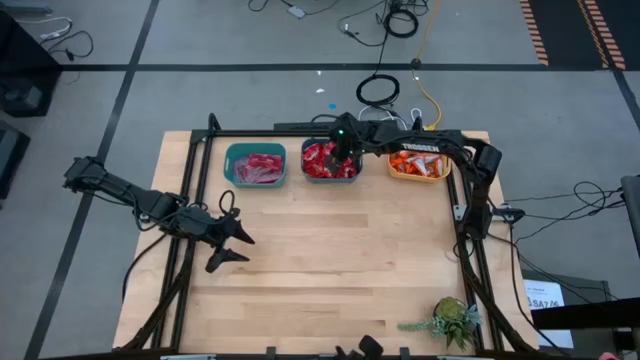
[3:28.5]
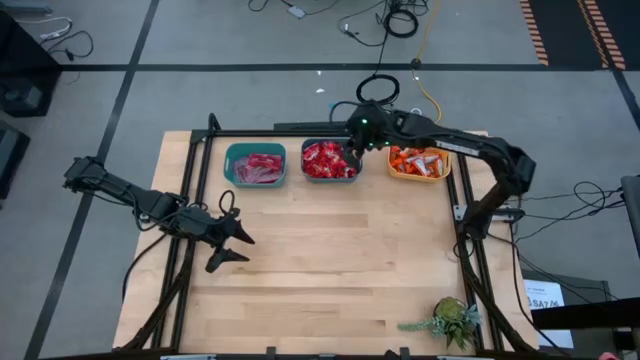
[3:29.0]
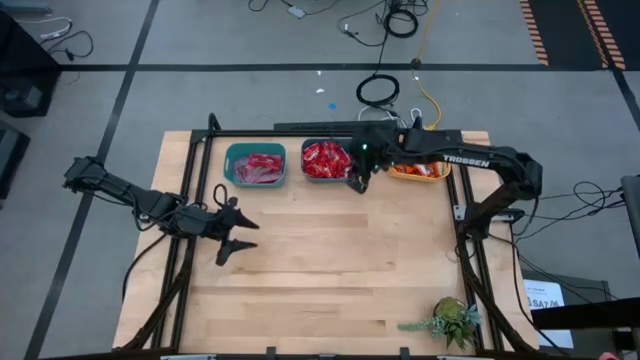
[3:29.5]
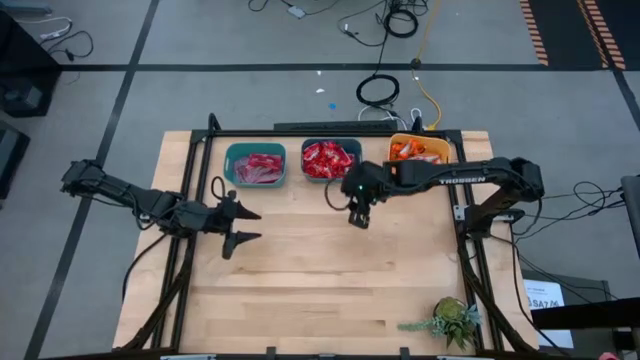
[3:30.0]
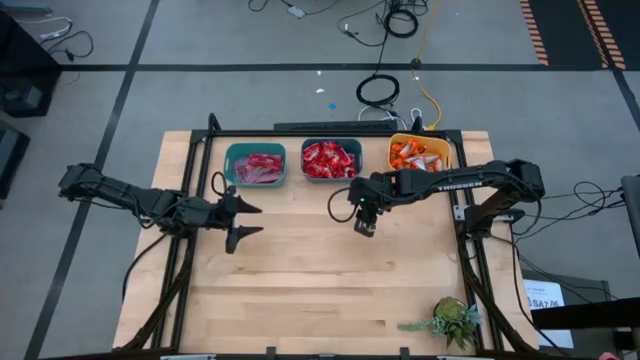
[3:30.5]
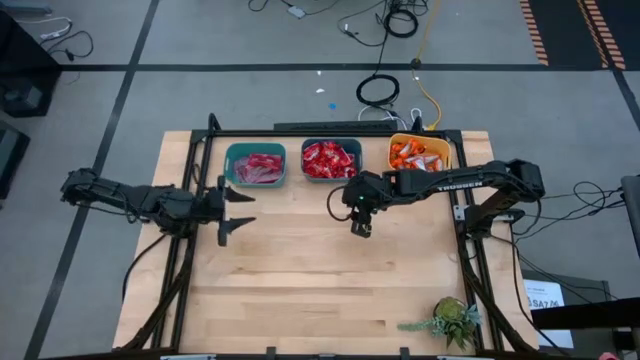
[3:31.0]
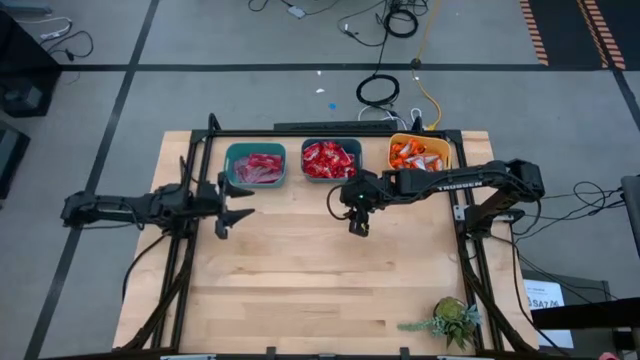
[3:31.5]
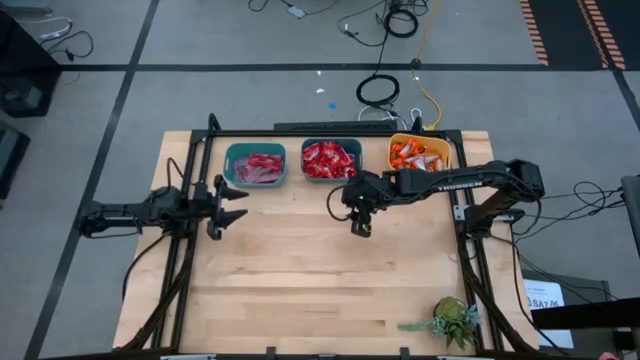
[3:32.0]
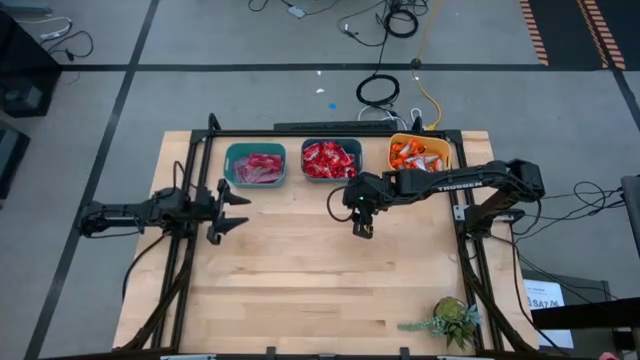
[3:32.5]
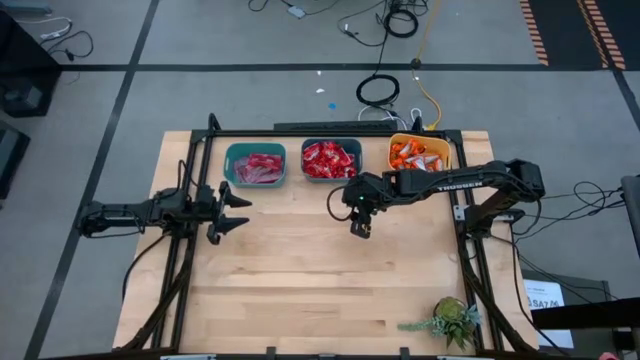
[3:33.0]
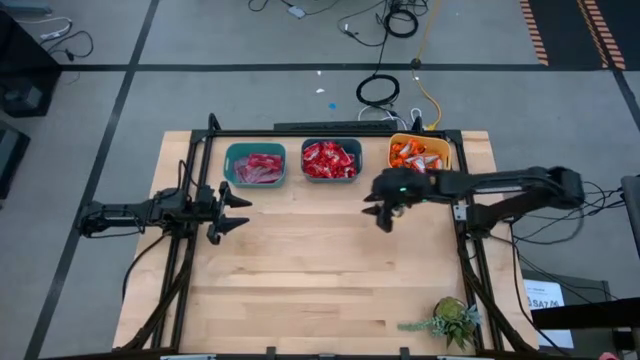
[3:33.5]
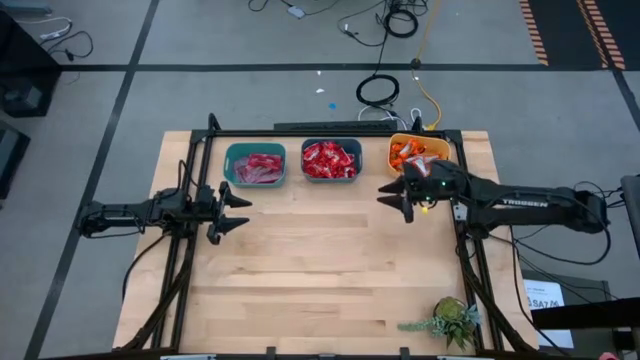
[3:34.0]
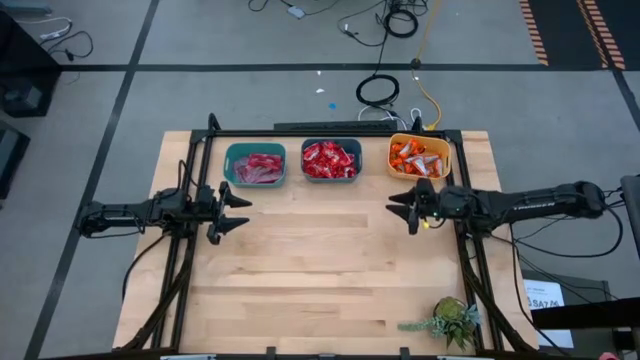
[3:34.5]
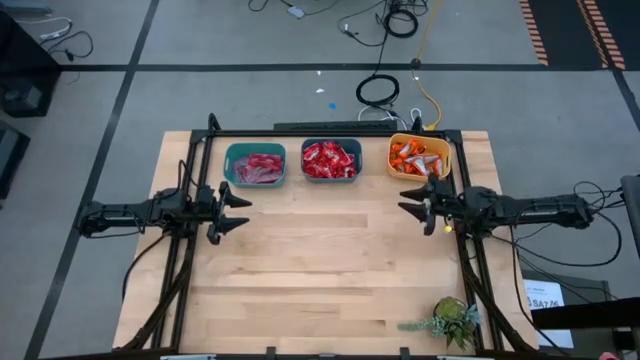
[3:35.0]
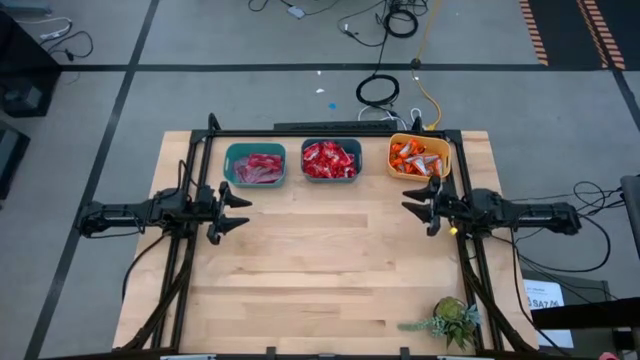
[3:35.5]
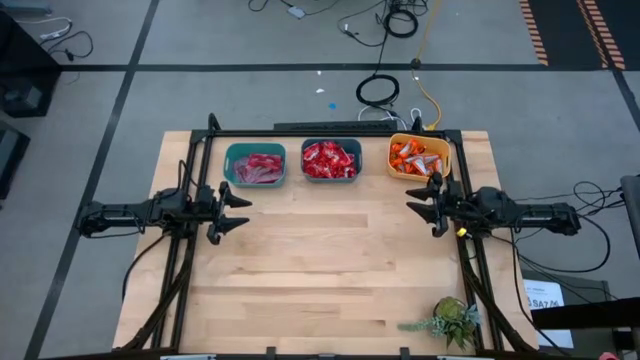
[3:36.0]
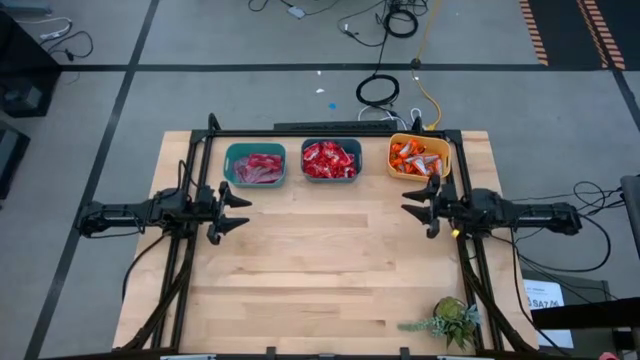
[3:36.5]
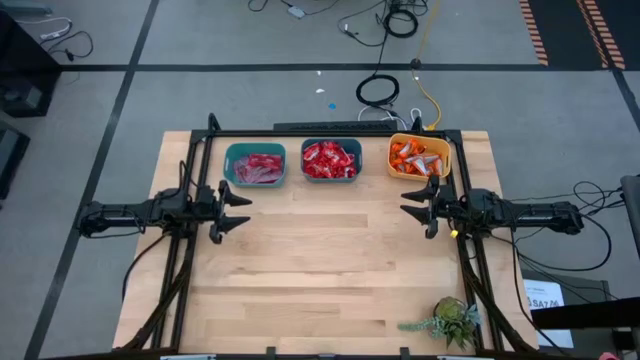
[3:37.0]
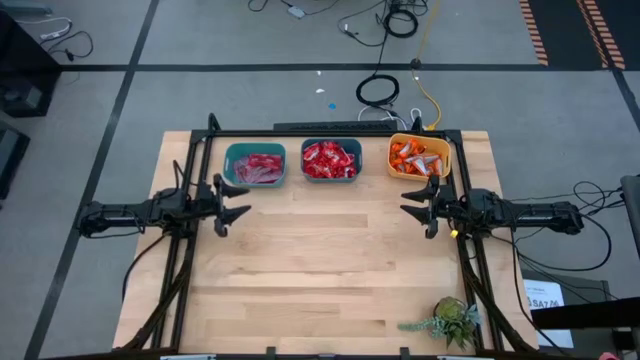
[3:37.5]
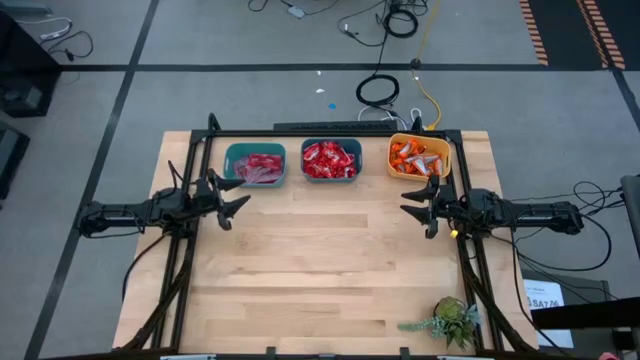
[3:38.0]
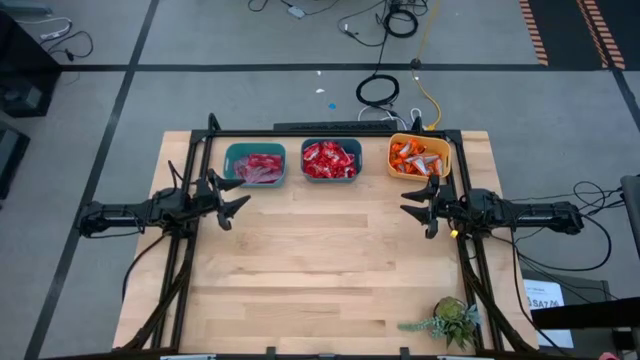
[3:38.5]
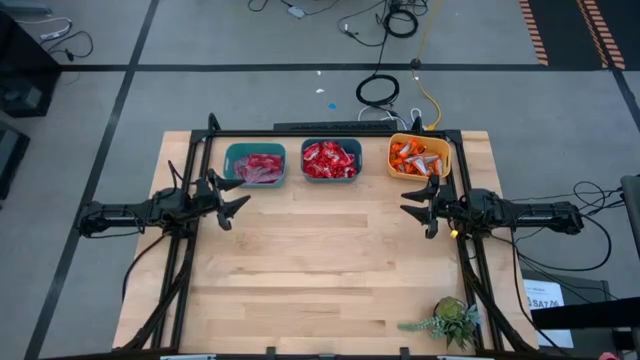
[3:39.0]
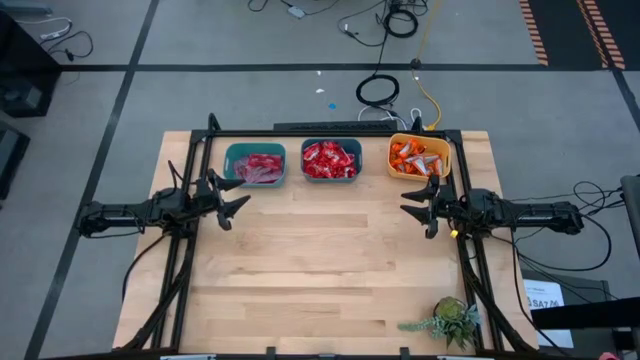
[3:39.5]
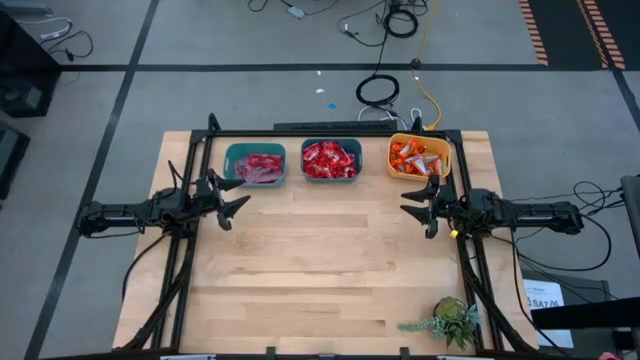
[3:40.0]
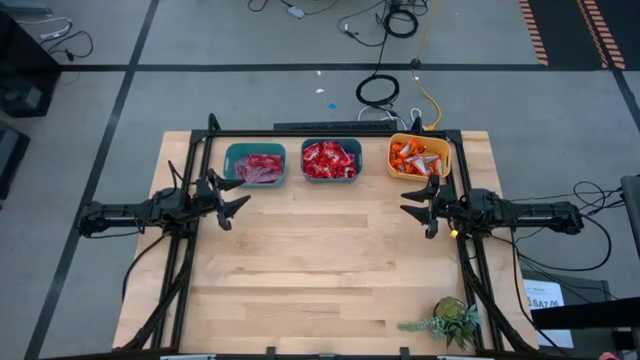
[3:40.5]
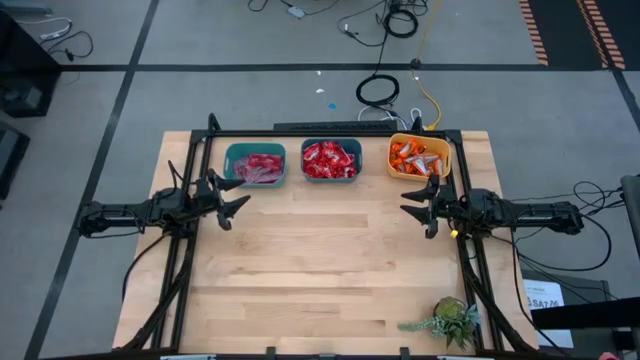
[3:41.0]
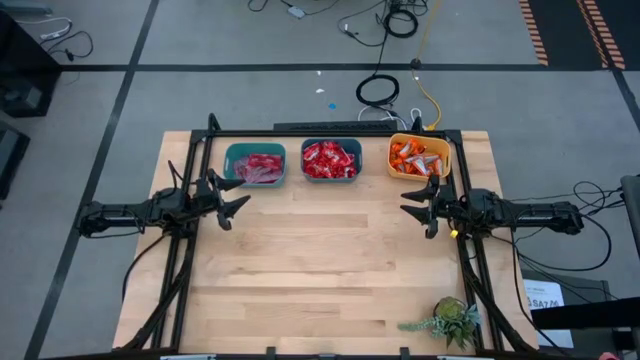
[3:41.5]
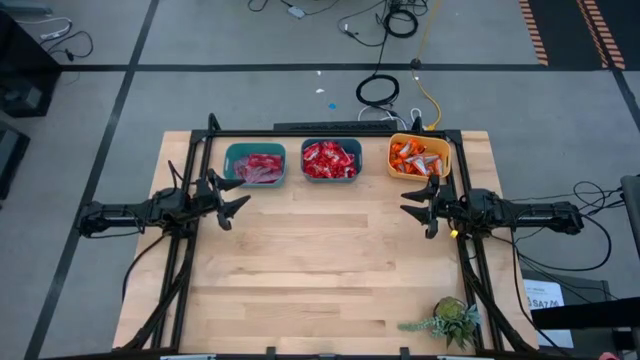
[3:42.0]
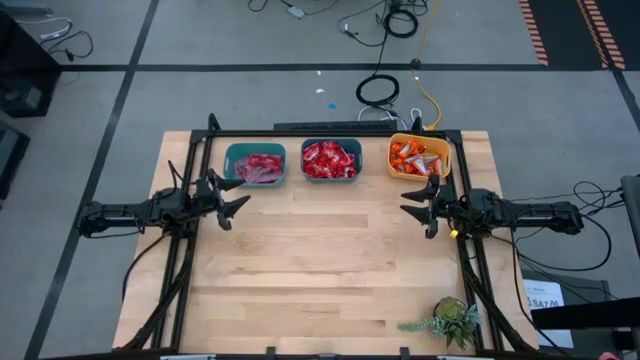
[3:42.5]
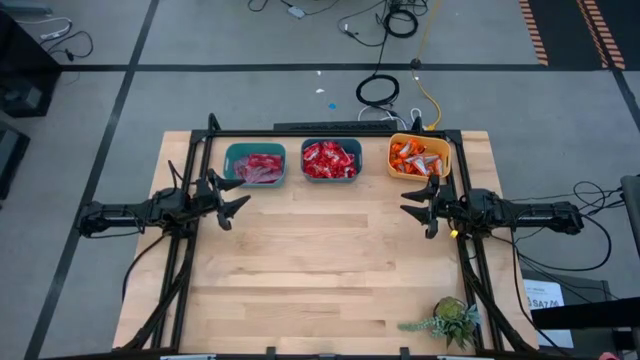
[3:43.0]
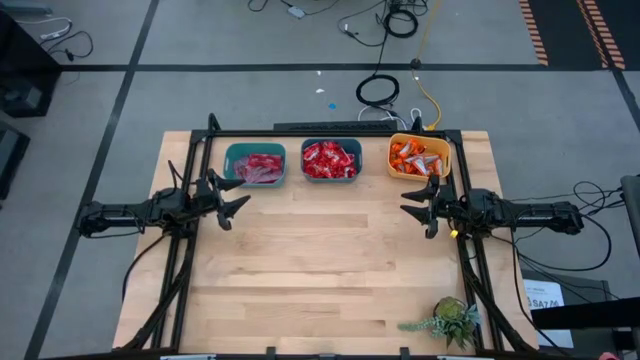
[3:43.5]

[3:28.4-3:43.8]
Task: Sort candy
Return to Home Position

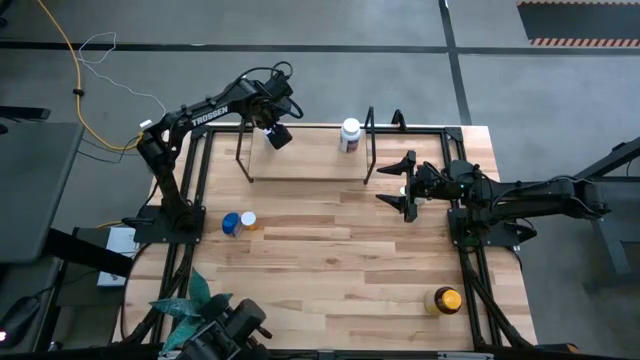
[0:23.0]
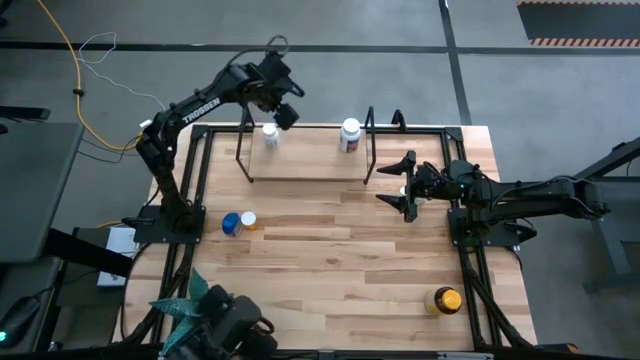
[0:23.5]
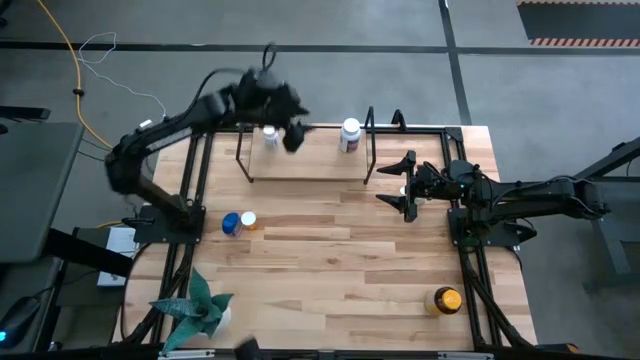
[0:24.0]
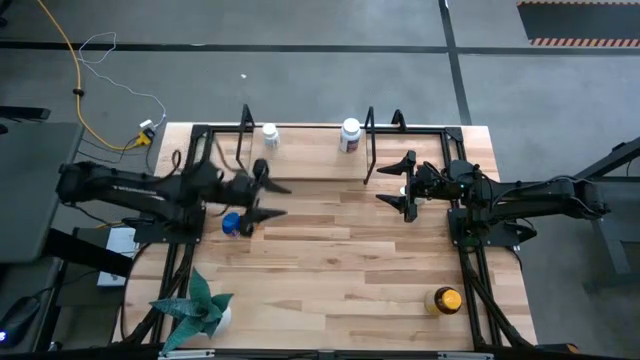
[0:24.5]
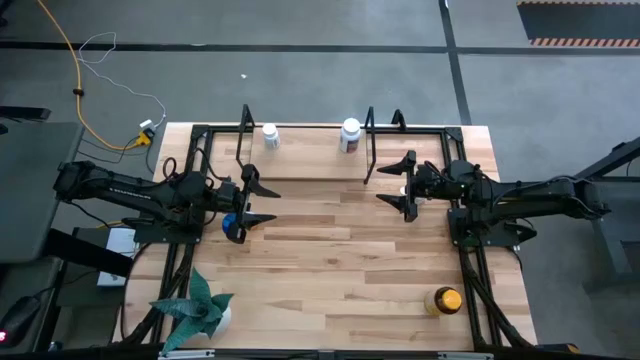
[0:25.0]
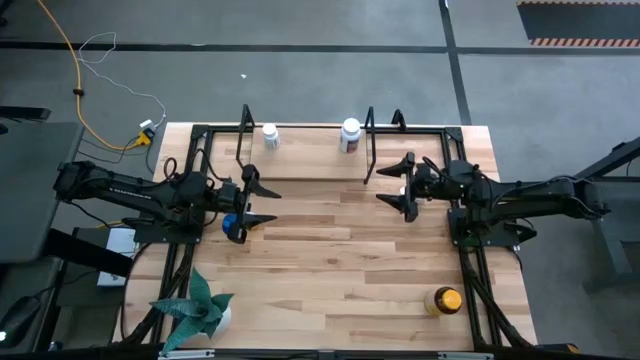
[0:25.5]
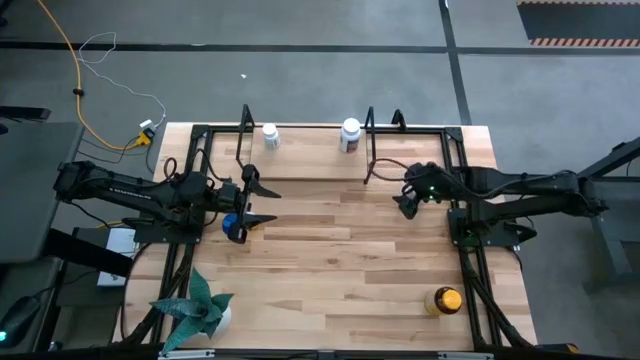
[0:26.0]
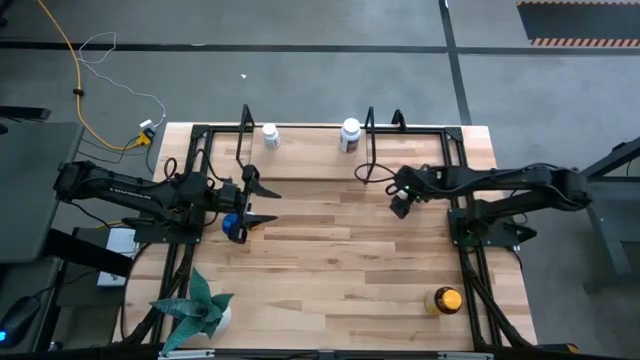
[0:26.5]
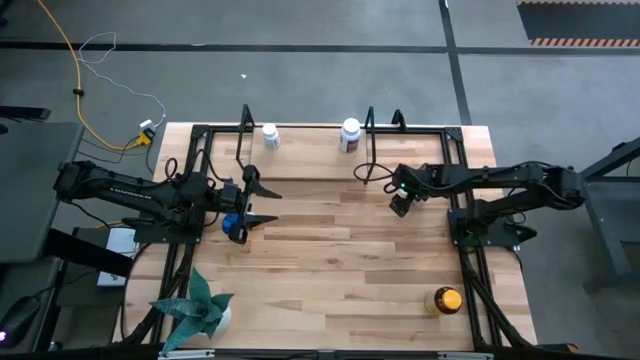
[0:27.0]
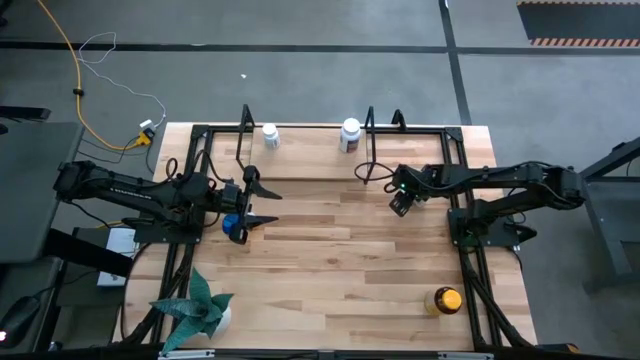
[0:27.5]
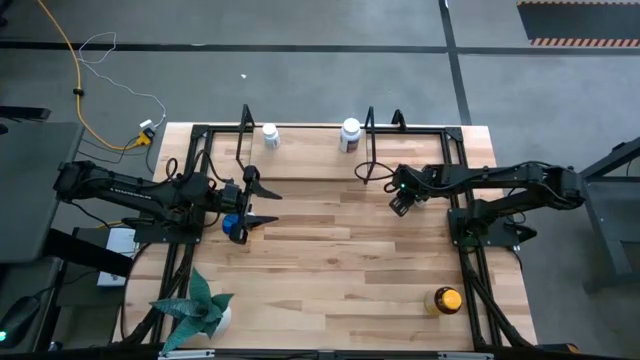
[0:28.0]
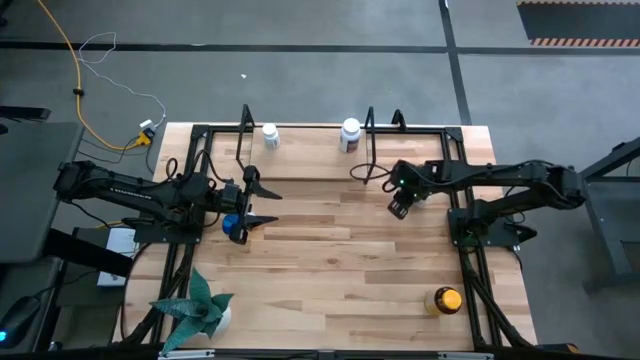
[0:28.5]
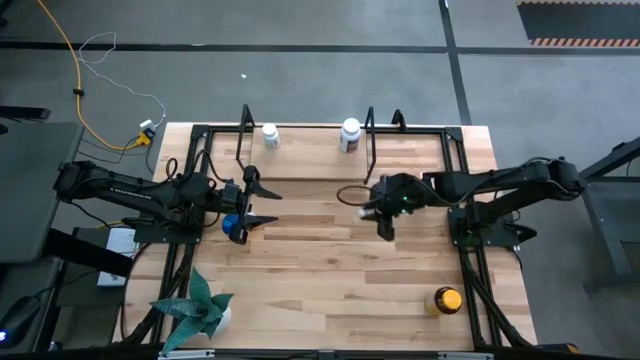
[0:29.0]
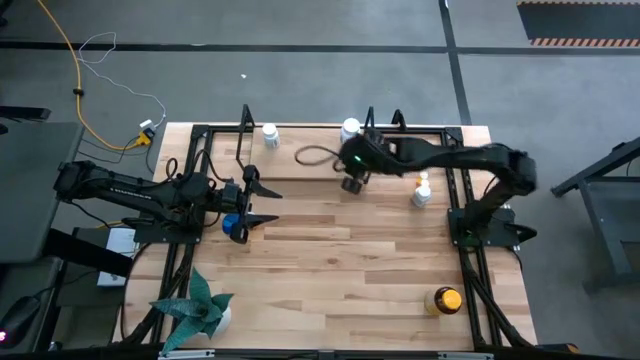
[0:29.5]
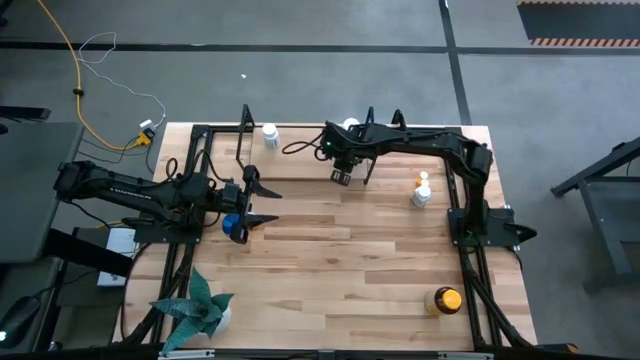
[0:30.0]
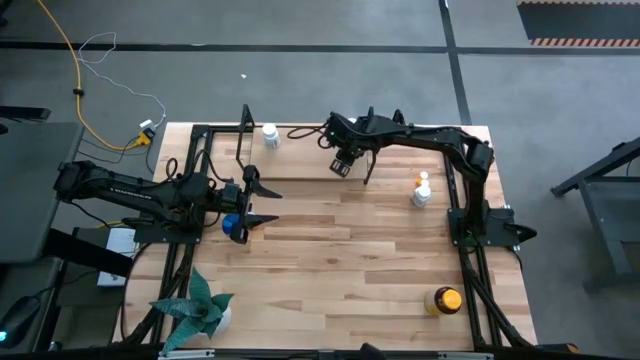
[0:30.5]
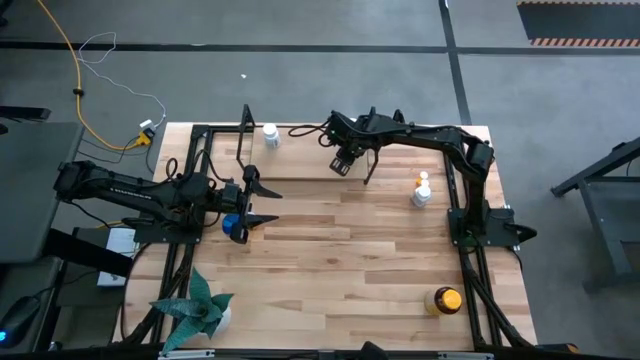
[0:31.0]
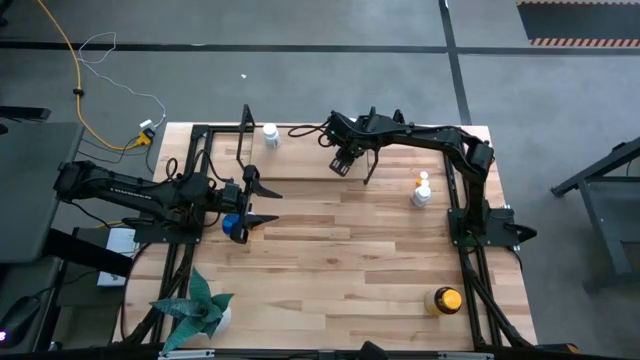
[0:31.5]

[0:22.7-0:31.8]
Task: Pick and place medicine bottles onto shelf by color
Put the yellow pill bottle on the shelf
